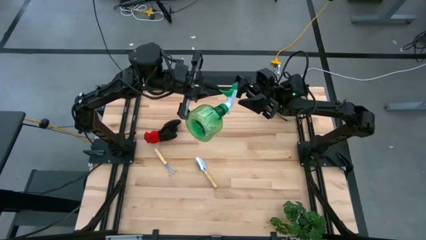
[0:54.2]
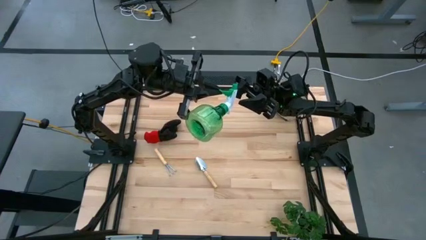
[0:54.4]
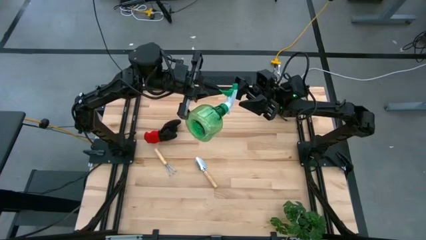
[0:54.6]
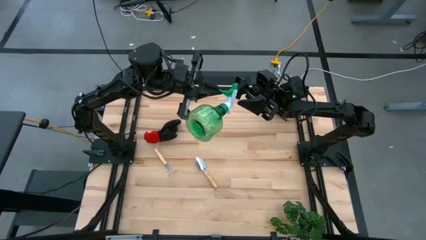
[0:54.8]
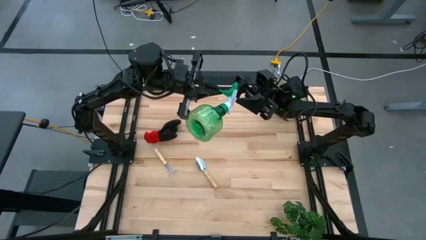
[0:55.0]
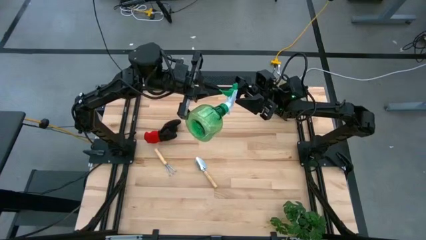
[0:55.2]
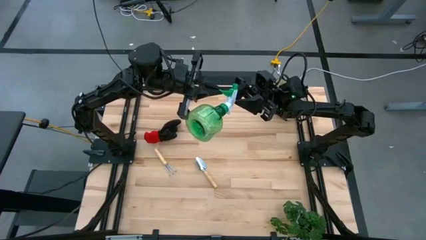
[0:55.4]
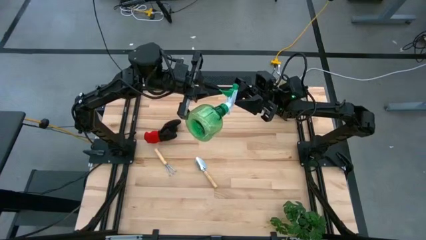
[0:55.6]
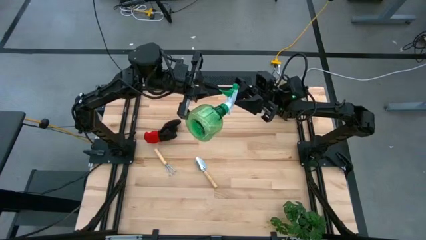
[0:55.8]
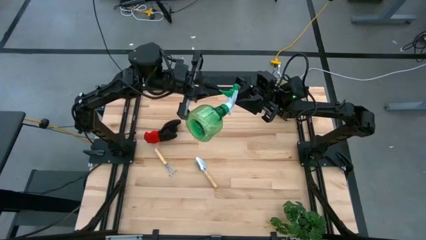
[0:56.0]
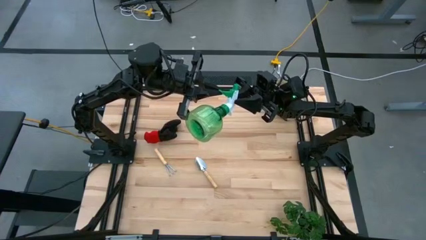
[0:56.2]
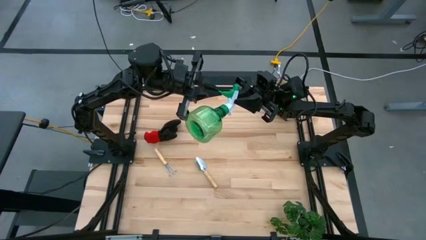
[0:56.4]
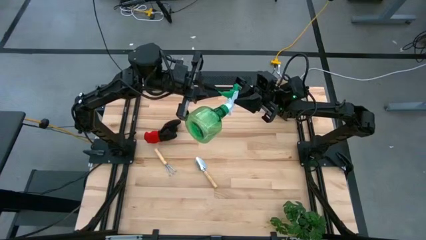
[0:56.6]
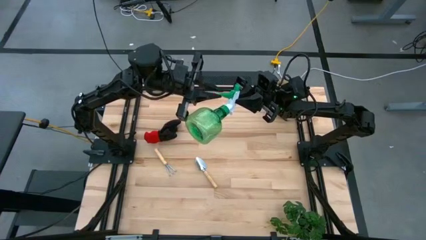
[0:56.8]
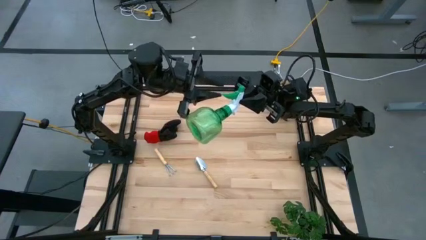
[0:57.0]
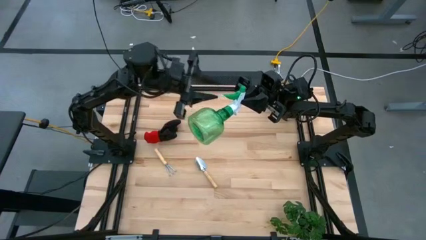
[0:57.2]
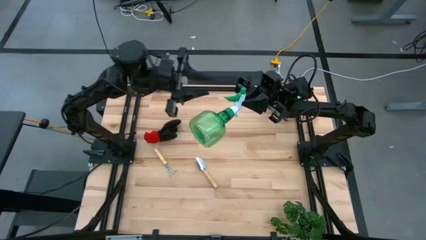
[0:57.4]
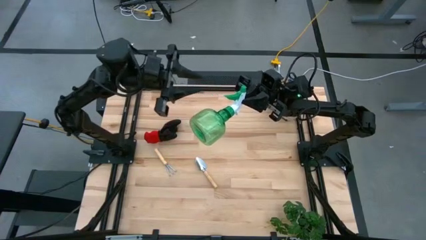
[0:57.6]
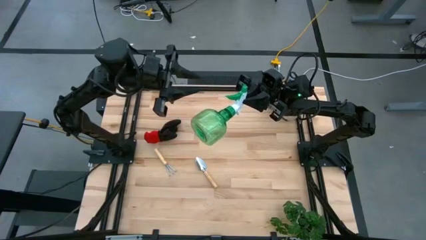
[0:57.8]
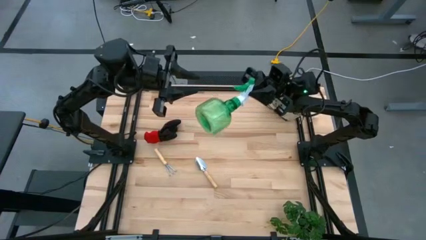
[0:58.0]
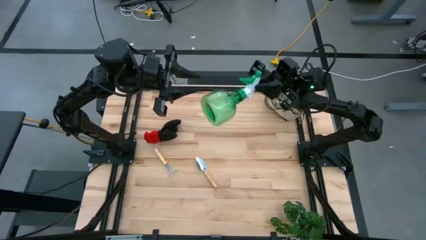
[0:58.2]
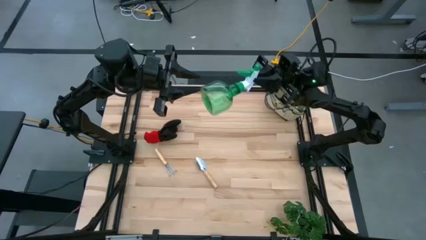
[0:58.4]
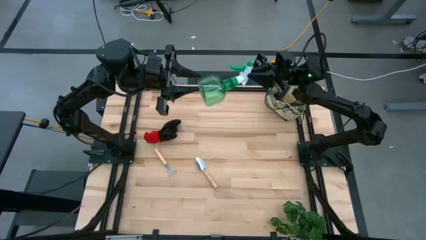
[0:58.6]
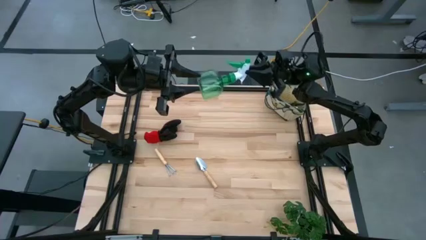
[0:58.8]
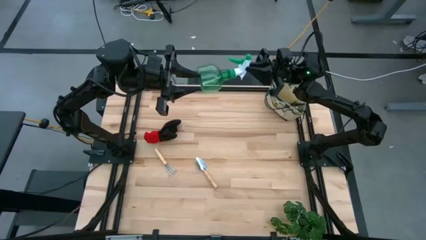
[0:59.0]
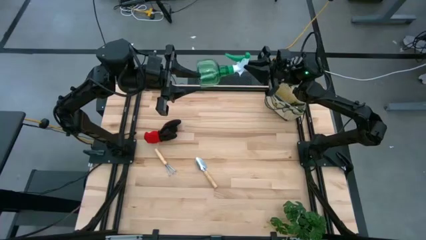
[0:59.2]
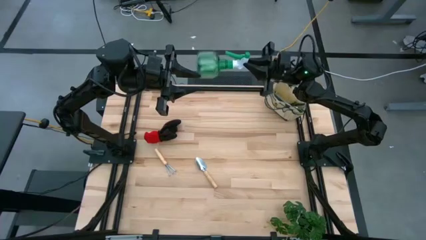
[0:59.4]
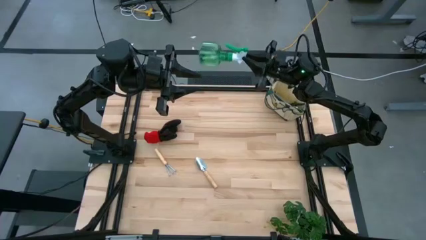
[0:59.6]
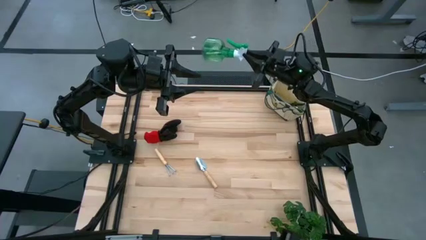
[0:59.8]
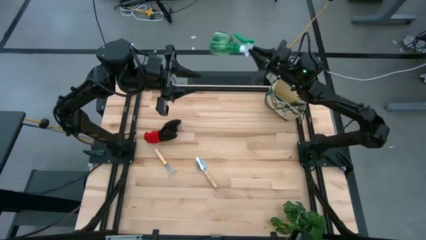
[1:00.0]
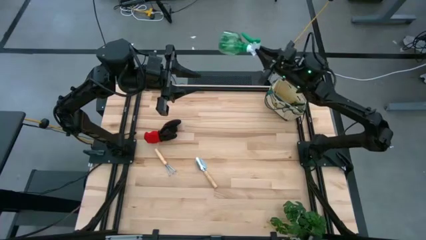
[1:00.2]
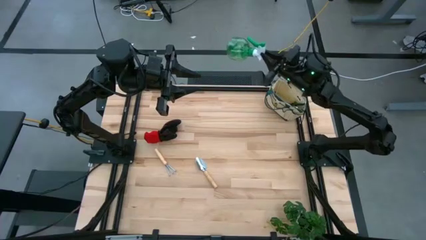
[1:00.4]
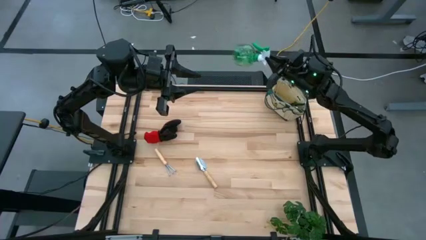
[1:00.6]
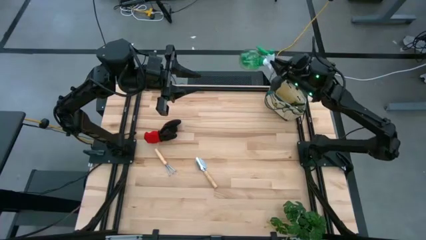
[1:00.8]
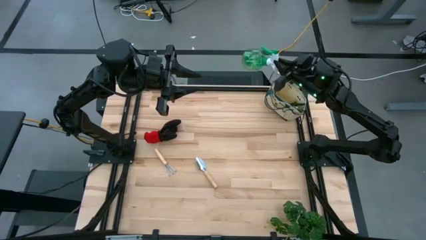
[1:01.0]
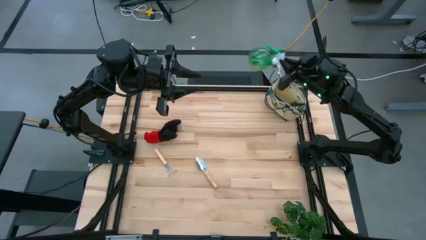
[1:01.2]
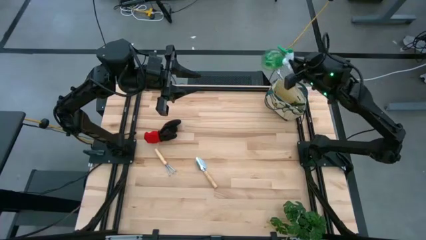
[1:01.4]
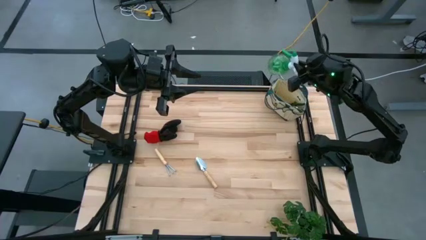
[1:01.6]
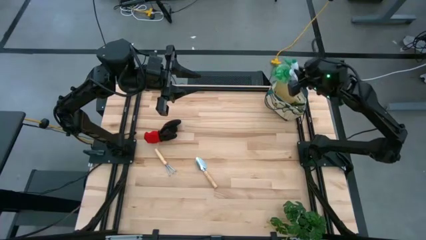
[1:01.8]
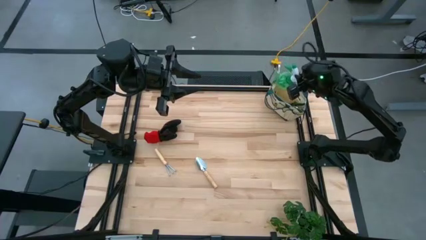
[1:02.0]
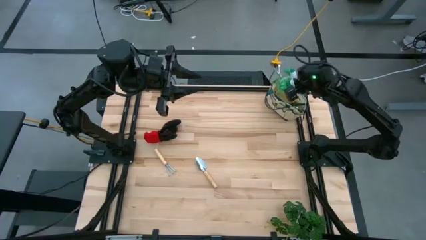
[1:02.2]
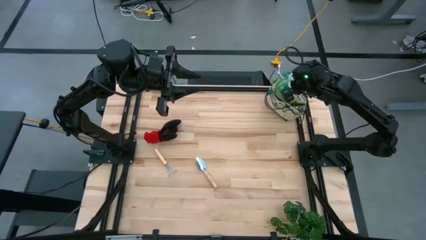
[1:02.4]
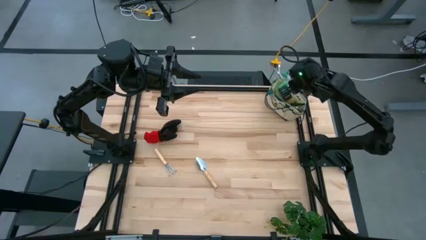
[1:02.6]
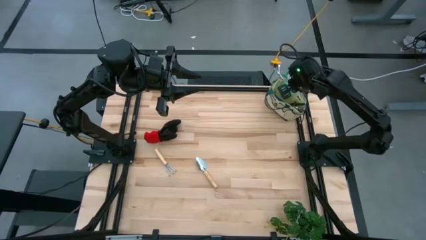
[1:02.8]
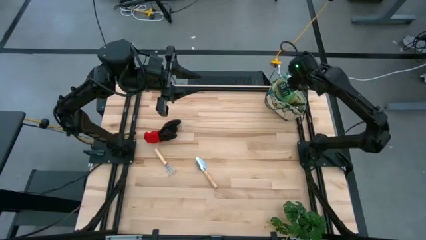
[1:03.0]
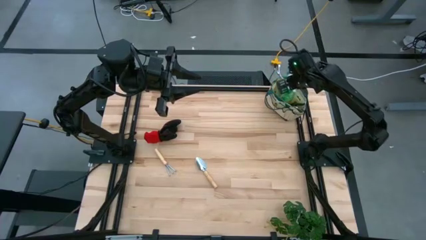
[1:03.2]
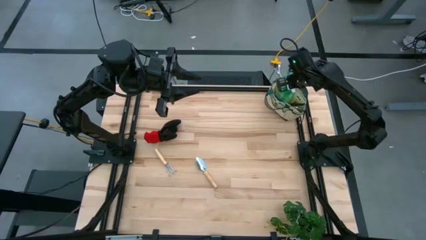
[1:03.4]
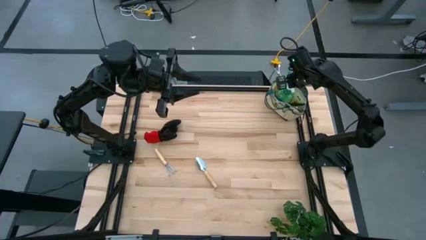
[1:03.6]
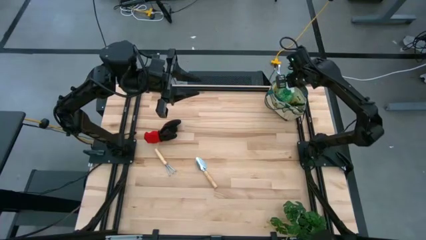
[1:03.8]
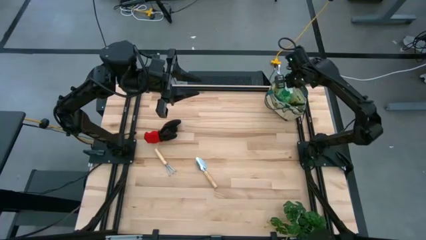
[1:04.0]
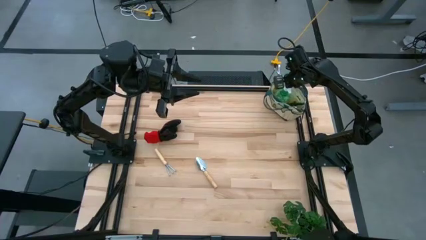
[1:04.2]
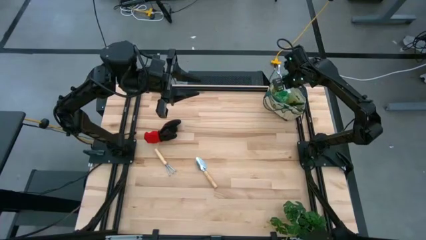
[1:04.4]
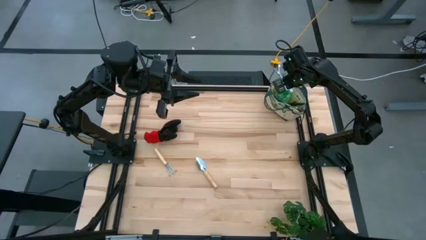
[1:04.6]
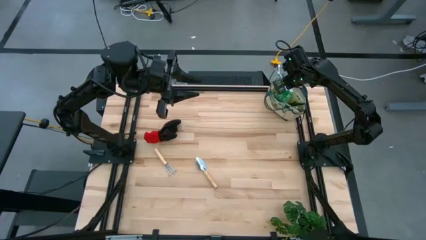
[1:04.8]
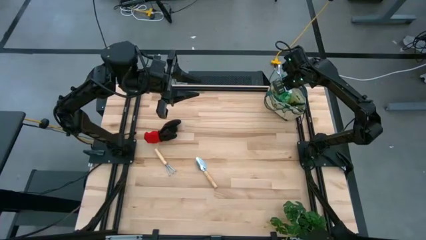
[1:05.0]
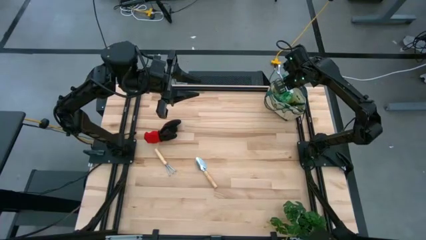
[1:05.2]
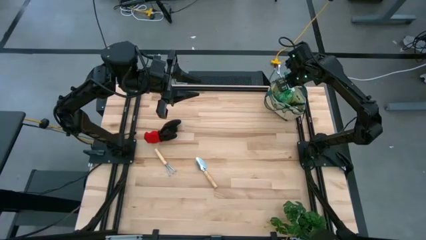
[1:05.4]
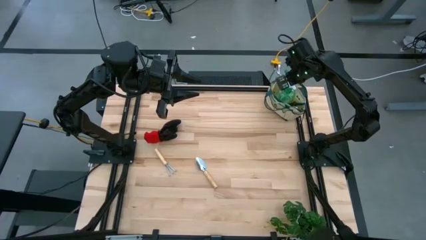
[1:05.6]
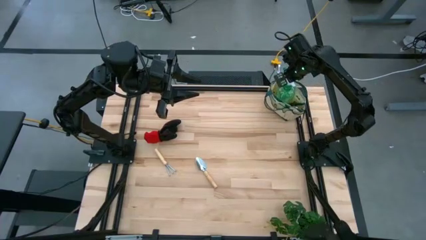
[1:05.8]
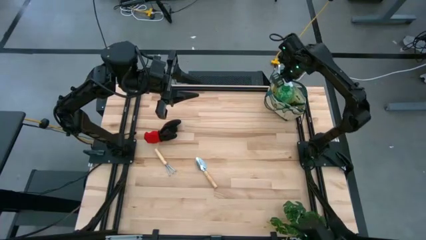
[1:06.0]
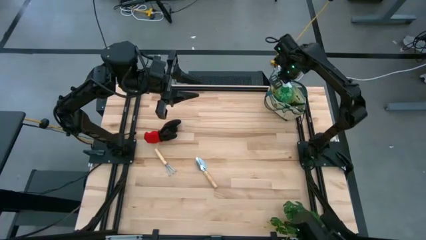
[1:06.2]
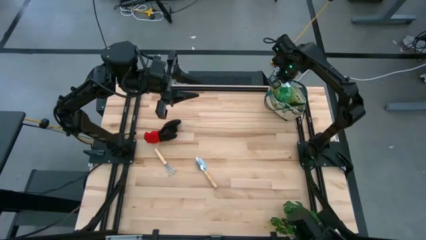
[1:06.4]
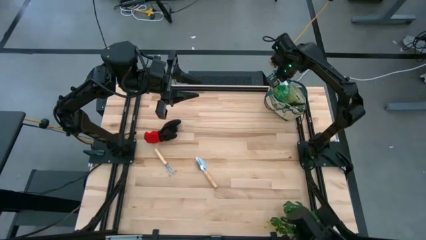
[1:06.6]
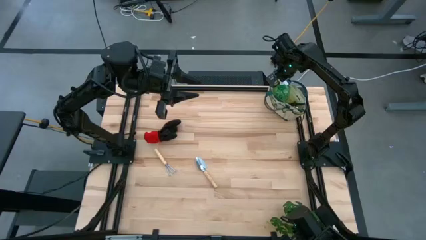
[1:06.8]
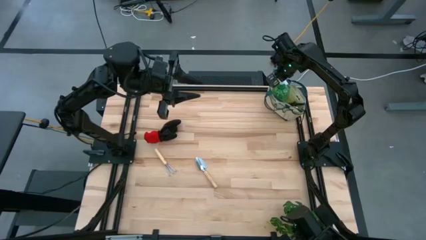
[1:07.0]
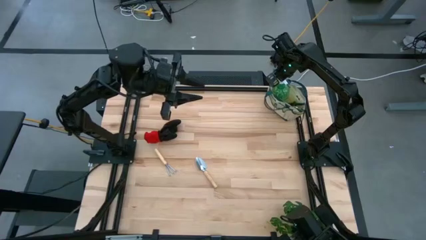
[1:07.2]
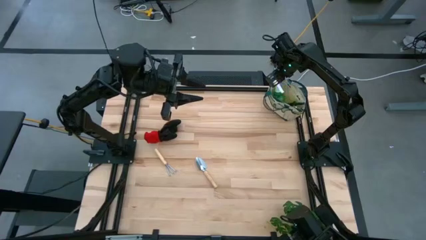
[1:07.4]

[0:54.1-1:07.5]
Task: Pick & Place Garden tools in Gardening bag
Put the green spray bottle into the gardening bag
